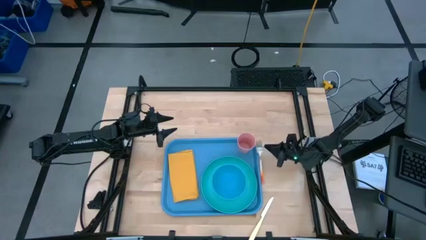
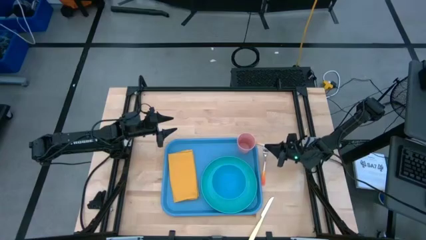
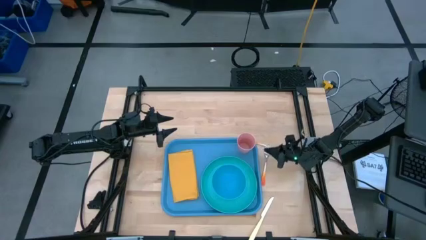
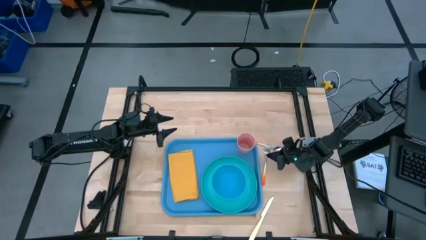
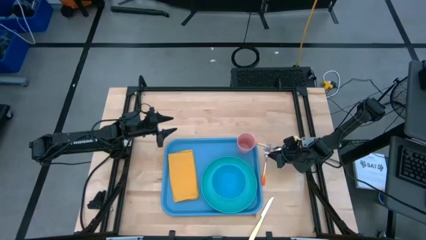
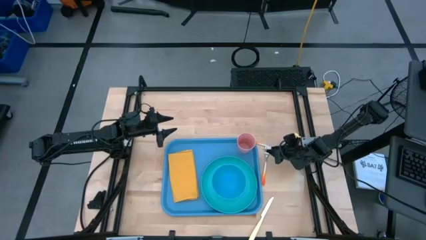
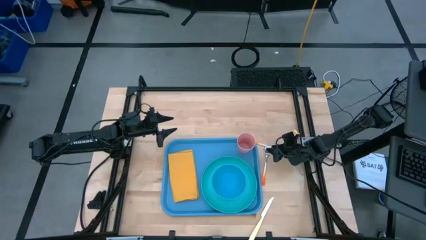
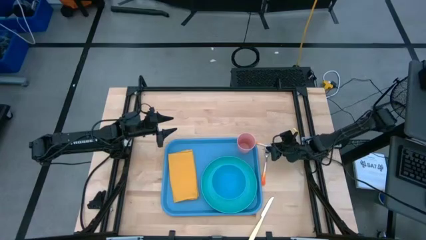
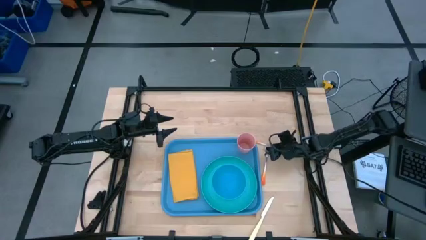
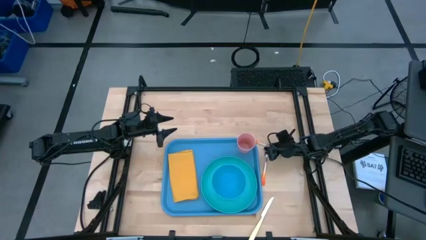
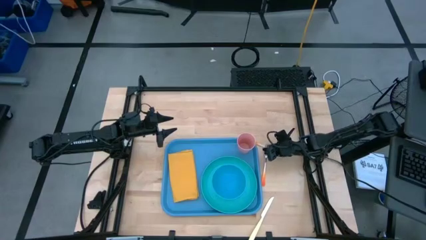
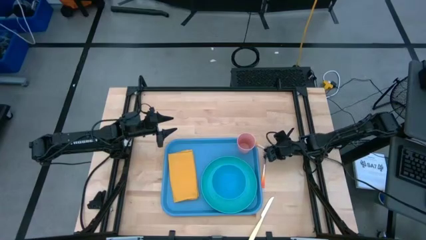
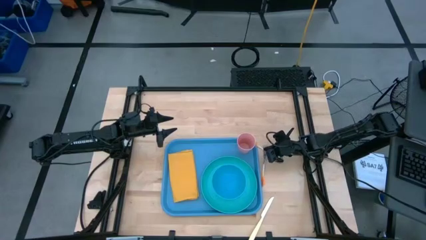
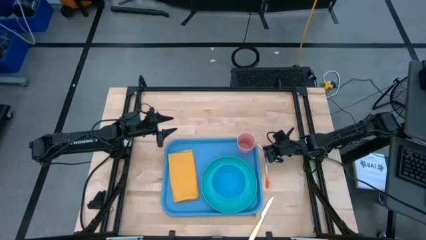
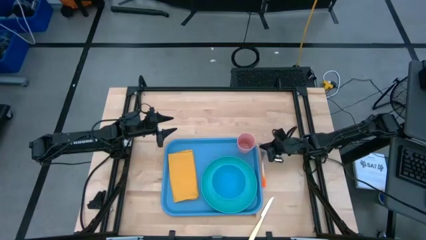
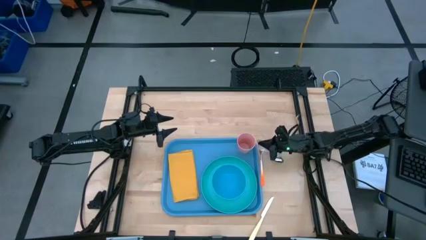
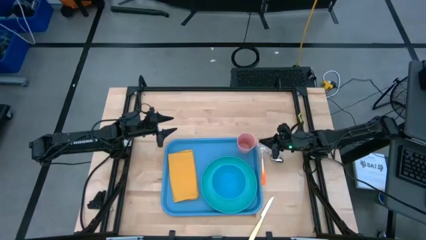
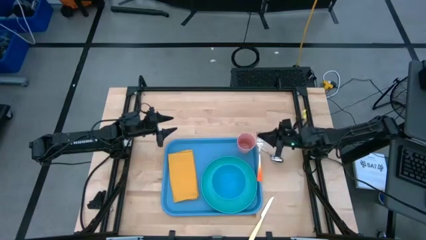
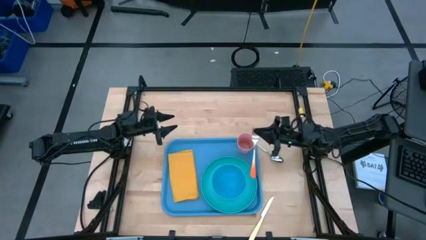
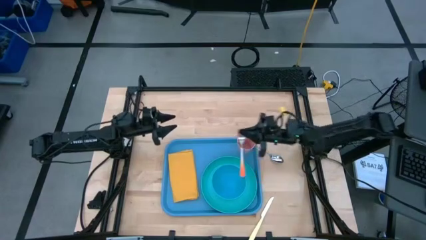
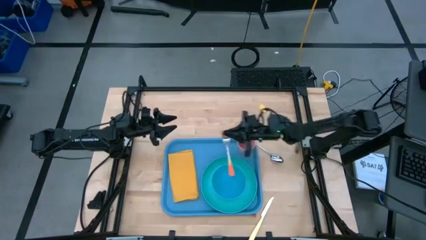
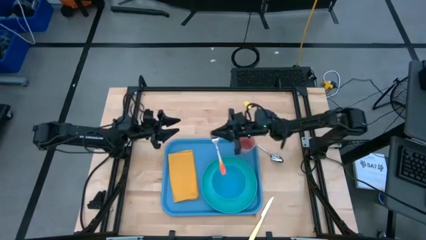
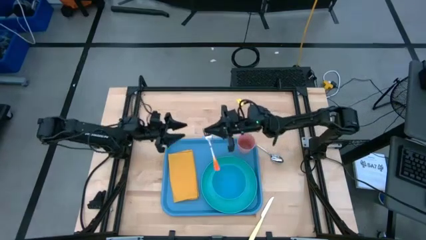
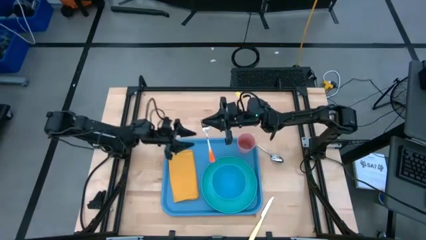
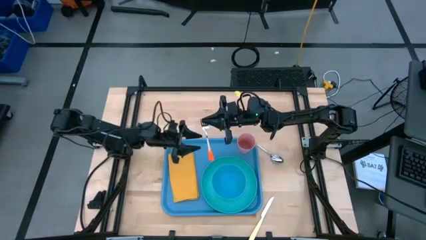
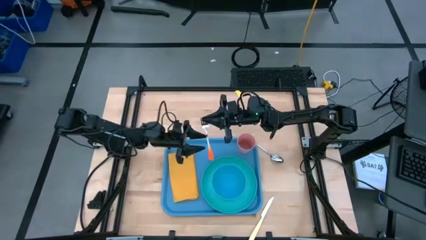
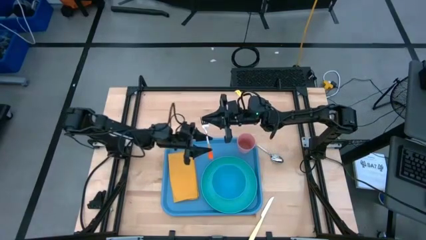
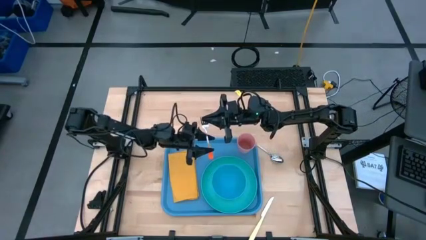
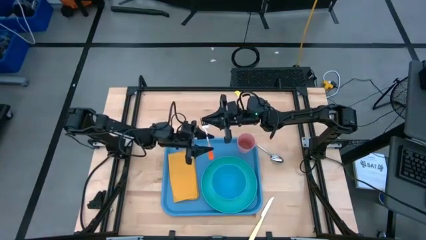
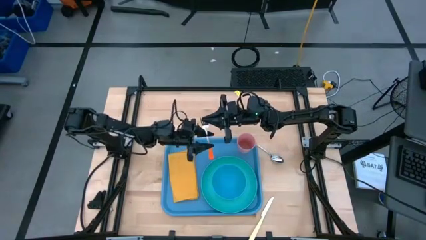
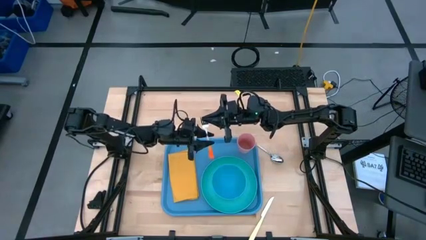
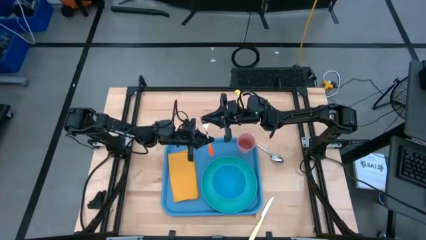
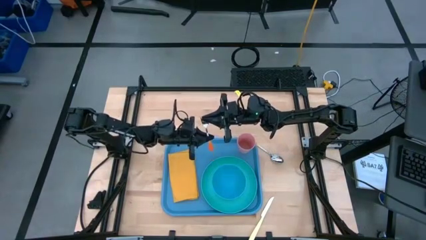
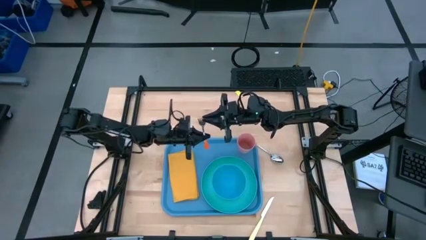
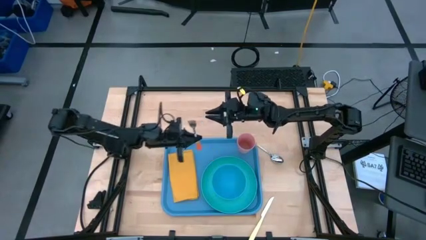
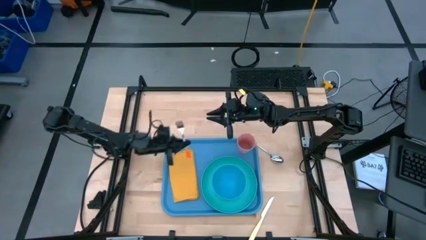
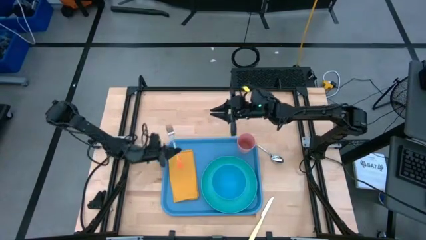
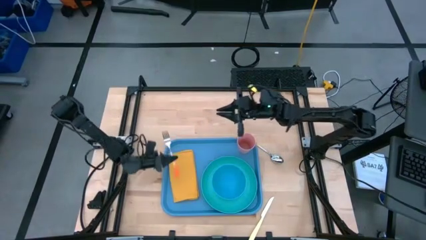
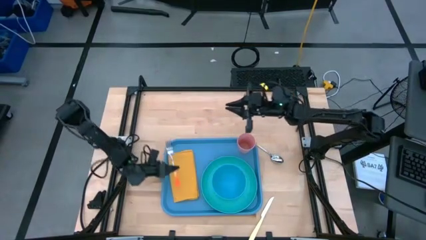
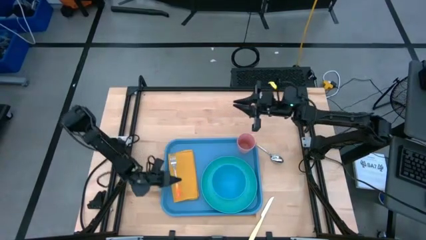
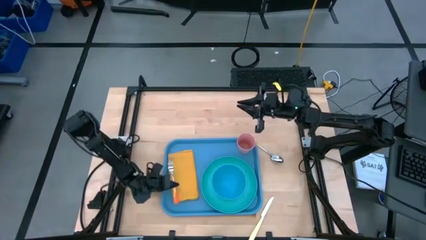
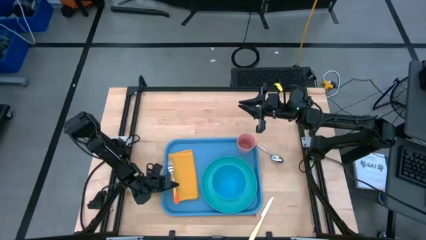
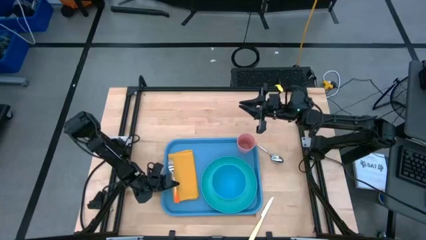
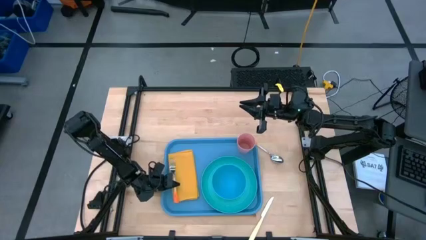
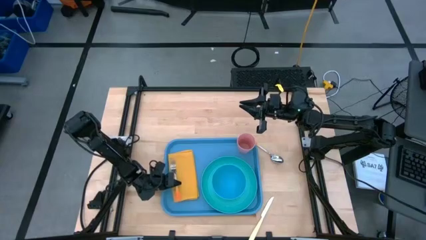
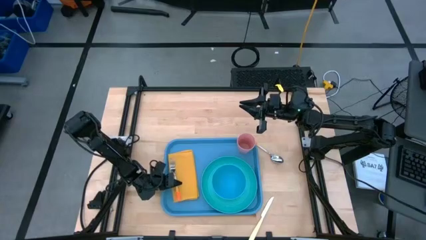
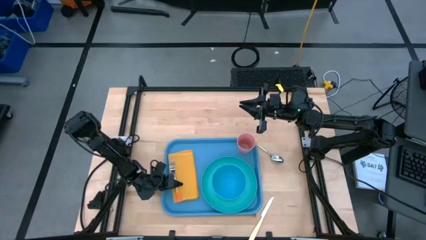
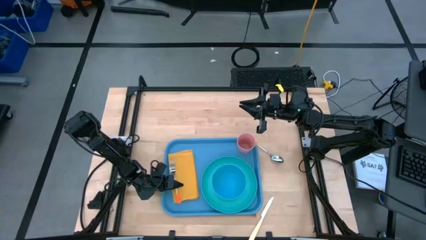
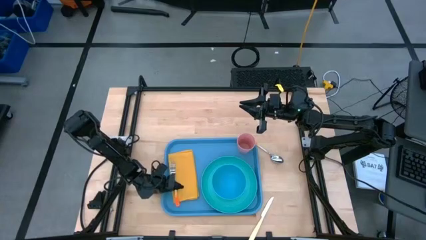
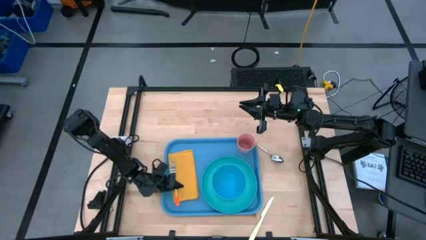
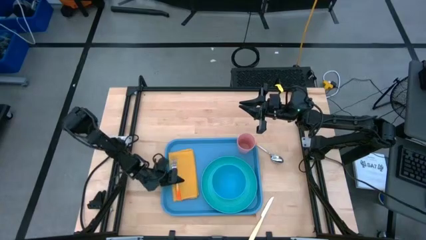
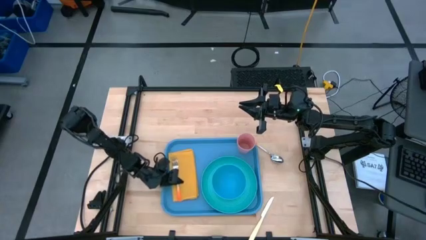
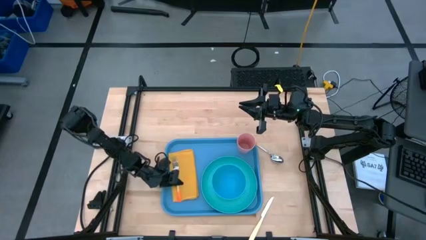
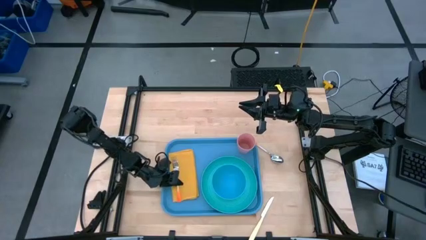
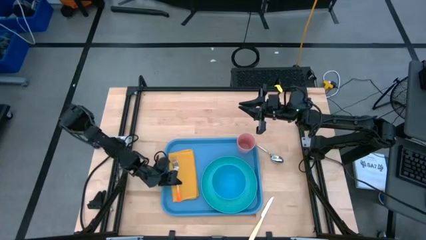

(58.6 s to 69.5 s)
Task: Set up tray
Put the orange fork on the yellow napkin
